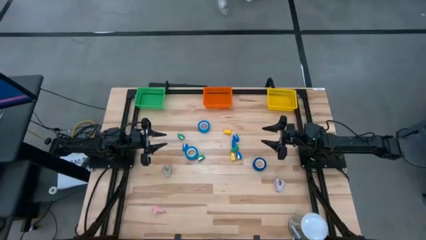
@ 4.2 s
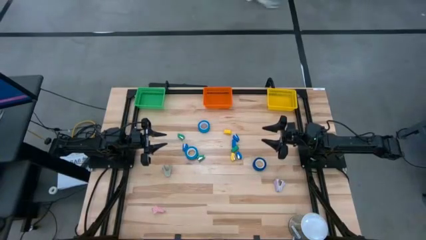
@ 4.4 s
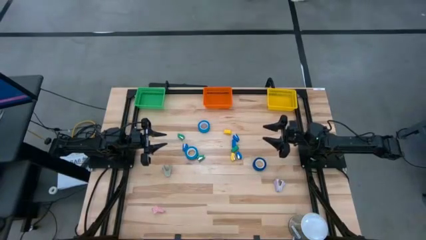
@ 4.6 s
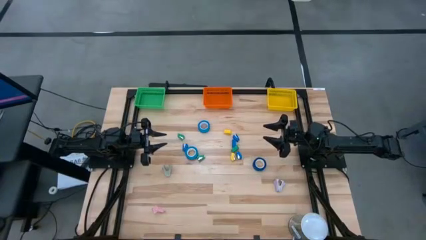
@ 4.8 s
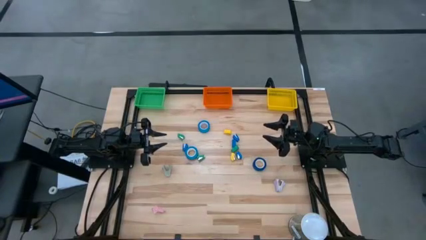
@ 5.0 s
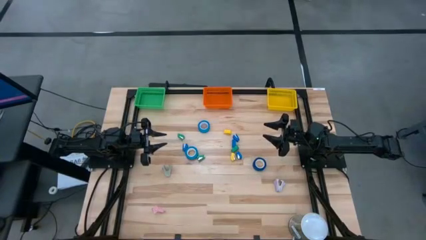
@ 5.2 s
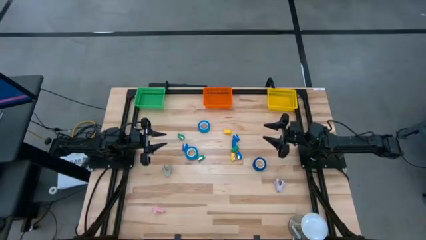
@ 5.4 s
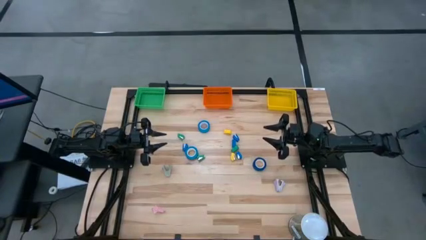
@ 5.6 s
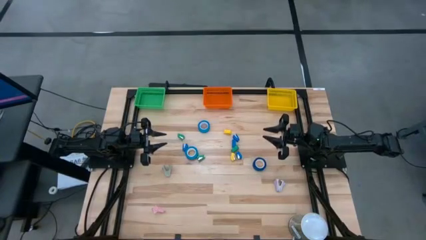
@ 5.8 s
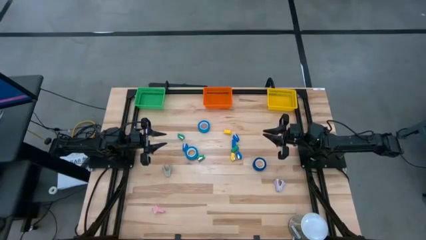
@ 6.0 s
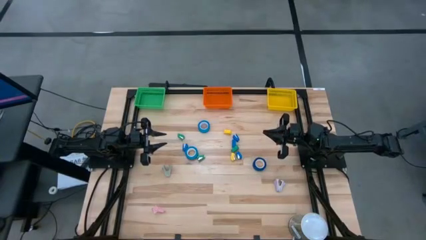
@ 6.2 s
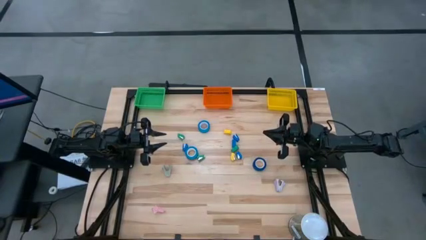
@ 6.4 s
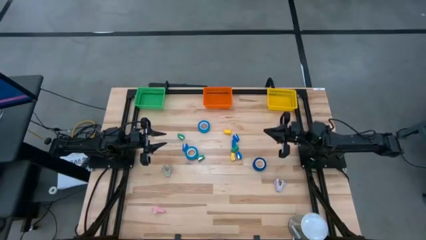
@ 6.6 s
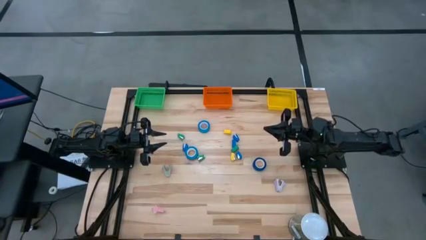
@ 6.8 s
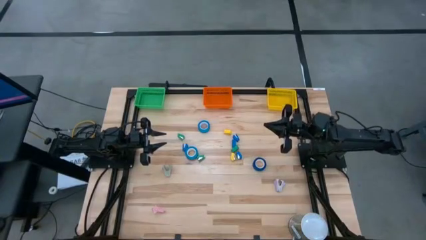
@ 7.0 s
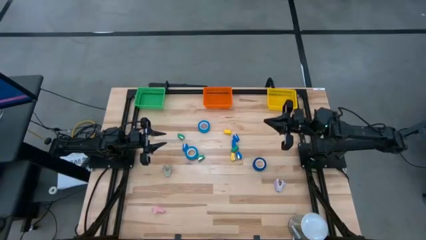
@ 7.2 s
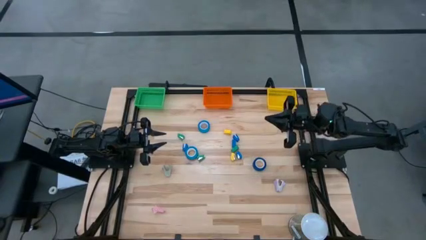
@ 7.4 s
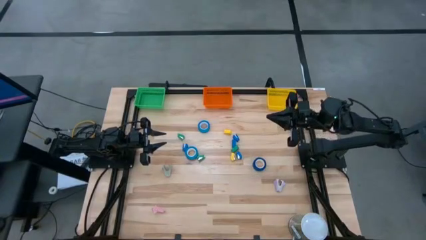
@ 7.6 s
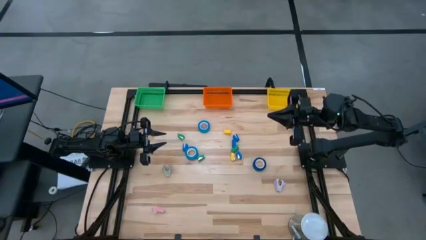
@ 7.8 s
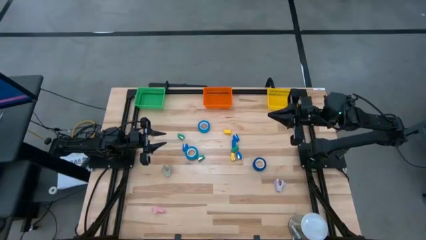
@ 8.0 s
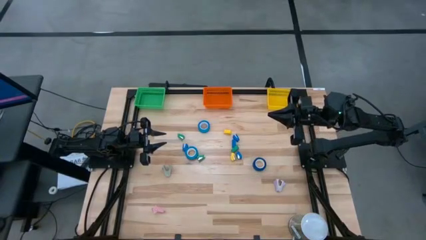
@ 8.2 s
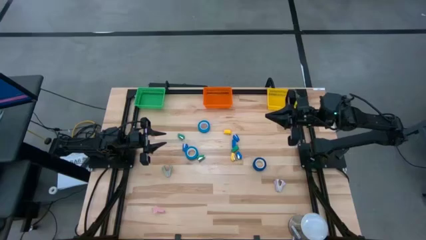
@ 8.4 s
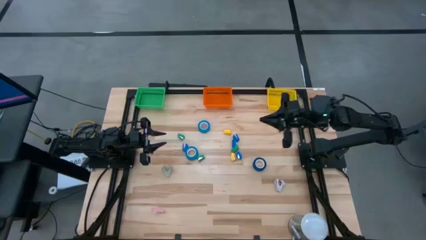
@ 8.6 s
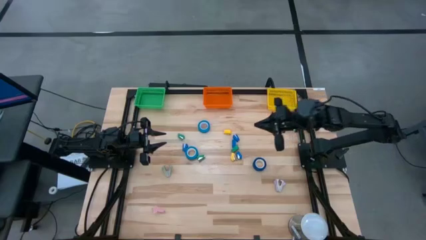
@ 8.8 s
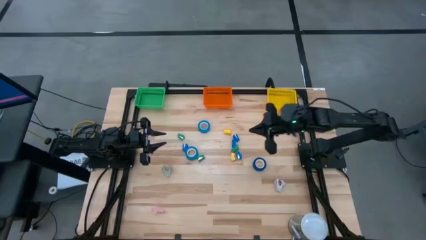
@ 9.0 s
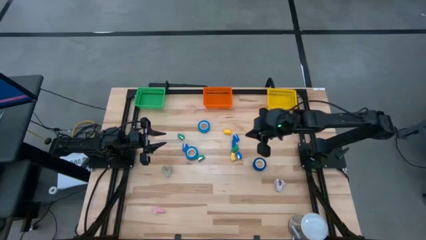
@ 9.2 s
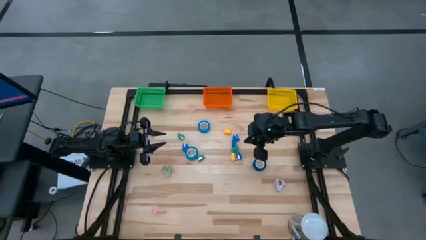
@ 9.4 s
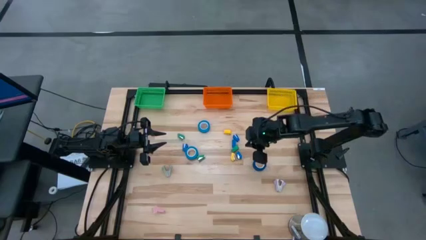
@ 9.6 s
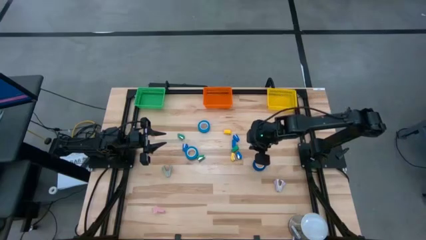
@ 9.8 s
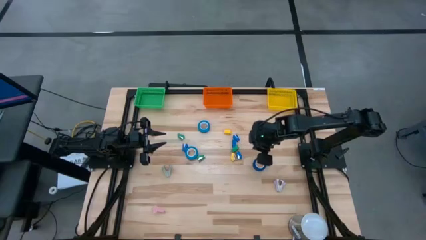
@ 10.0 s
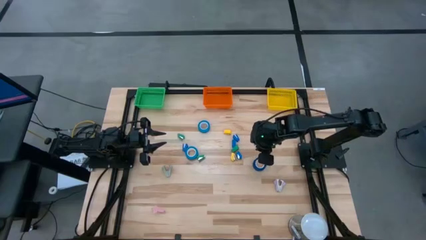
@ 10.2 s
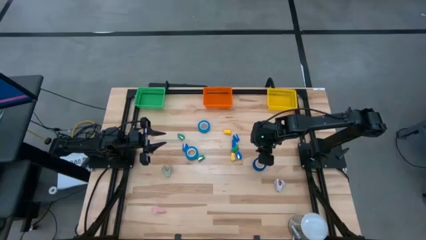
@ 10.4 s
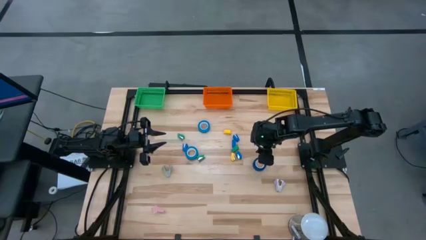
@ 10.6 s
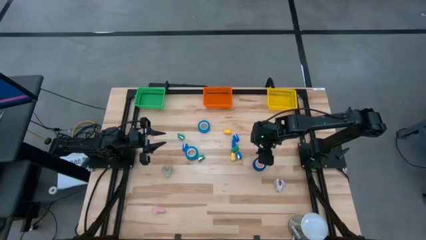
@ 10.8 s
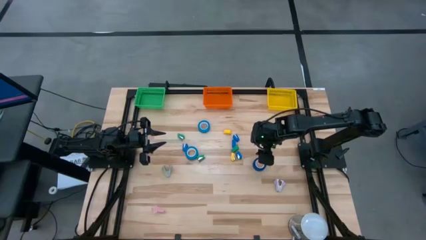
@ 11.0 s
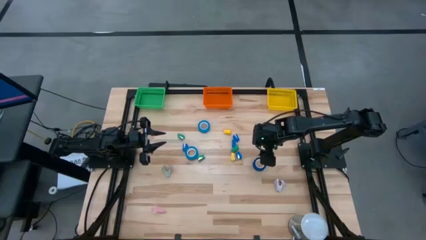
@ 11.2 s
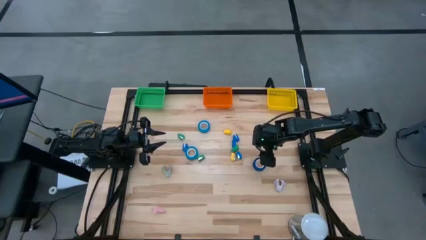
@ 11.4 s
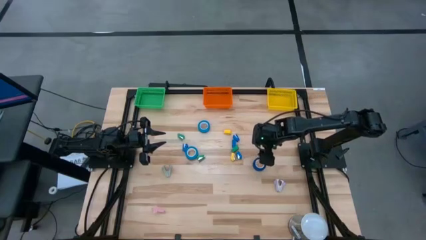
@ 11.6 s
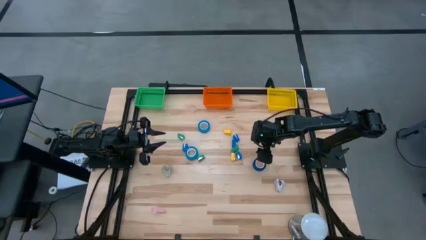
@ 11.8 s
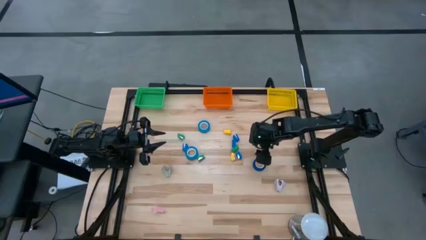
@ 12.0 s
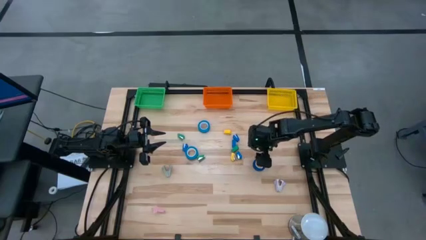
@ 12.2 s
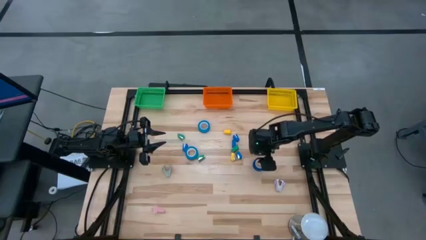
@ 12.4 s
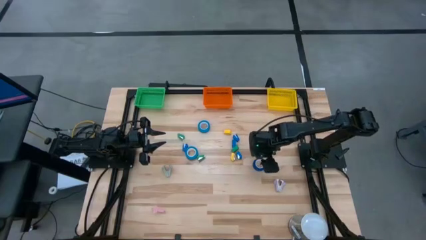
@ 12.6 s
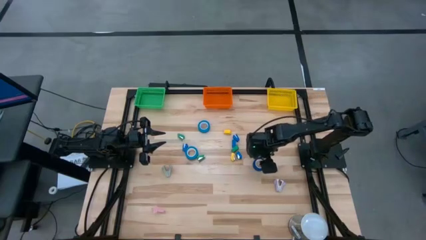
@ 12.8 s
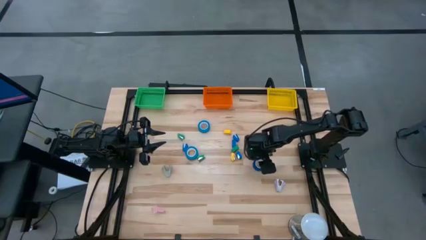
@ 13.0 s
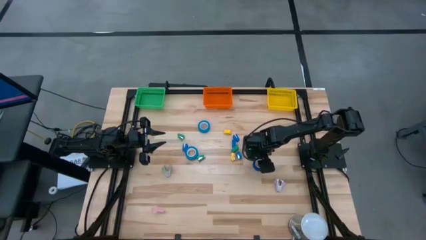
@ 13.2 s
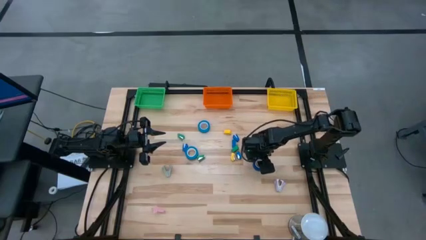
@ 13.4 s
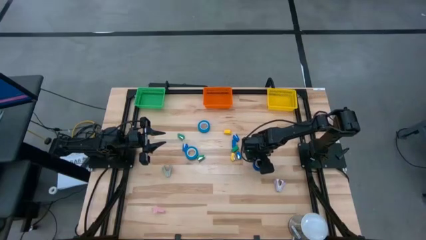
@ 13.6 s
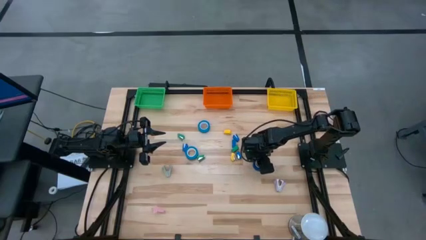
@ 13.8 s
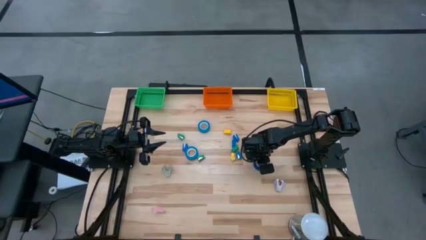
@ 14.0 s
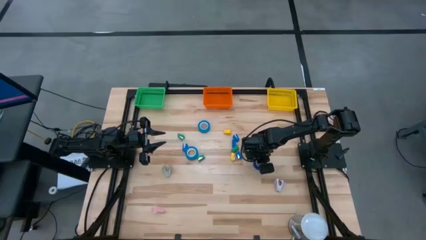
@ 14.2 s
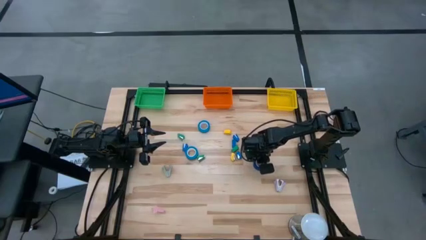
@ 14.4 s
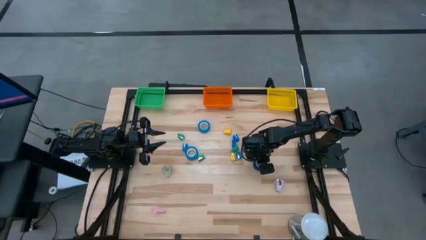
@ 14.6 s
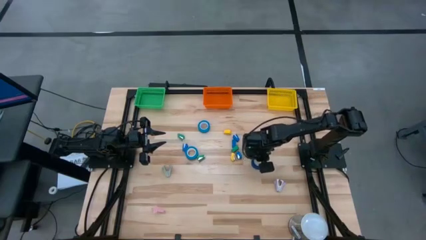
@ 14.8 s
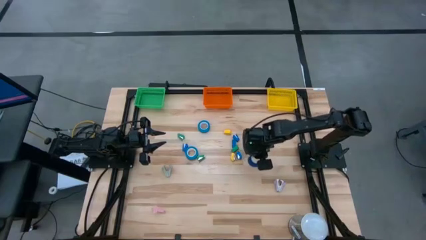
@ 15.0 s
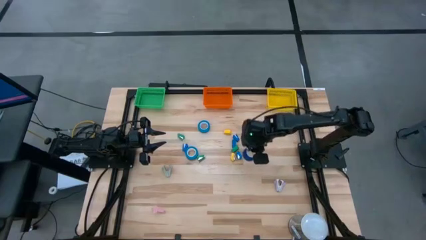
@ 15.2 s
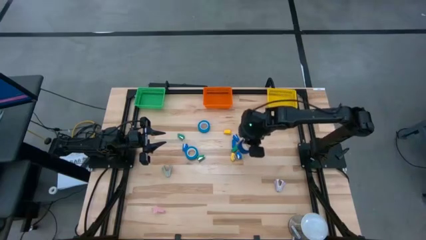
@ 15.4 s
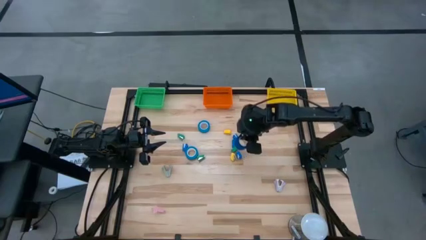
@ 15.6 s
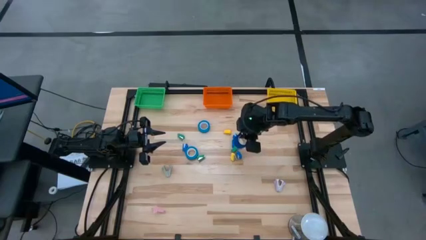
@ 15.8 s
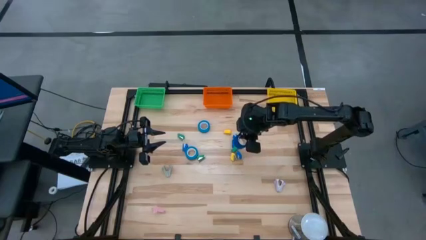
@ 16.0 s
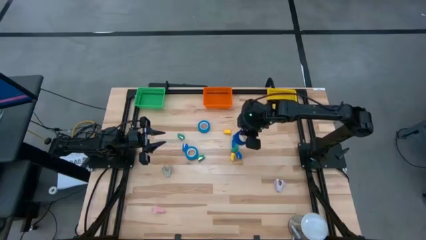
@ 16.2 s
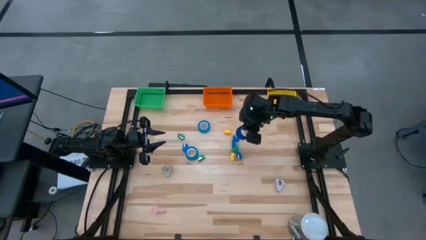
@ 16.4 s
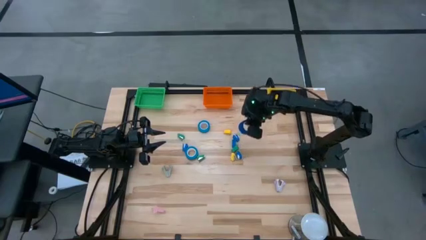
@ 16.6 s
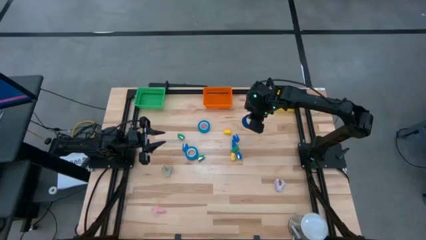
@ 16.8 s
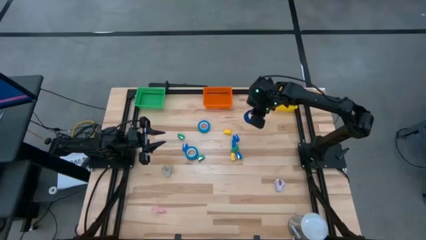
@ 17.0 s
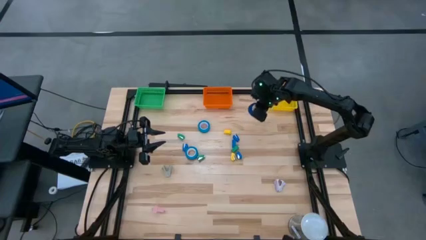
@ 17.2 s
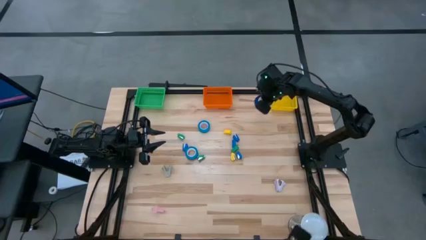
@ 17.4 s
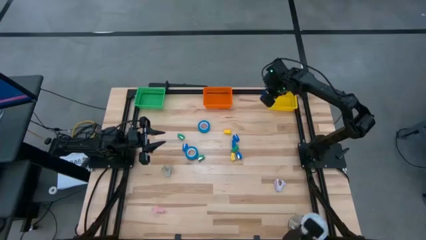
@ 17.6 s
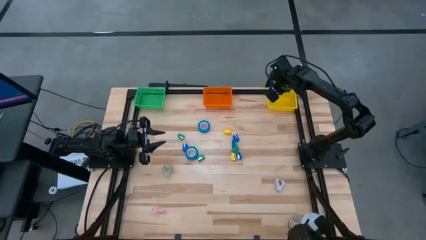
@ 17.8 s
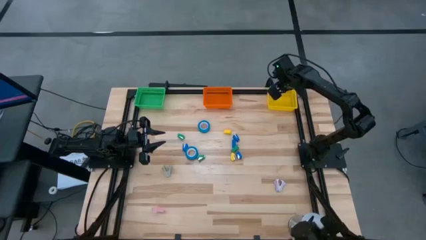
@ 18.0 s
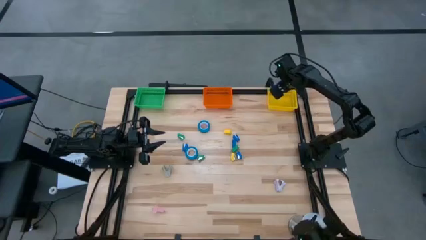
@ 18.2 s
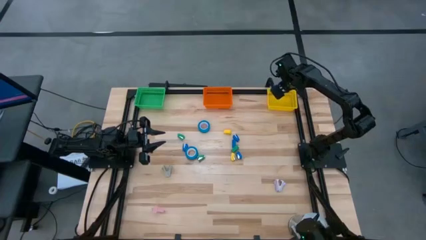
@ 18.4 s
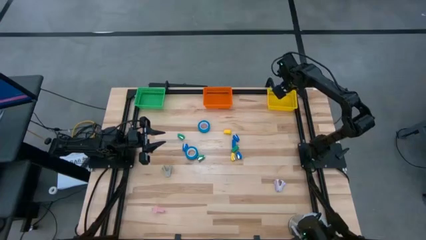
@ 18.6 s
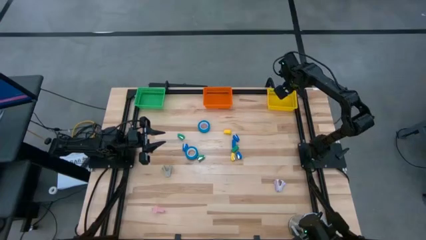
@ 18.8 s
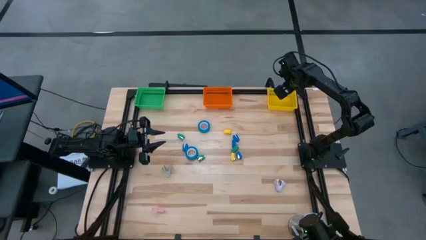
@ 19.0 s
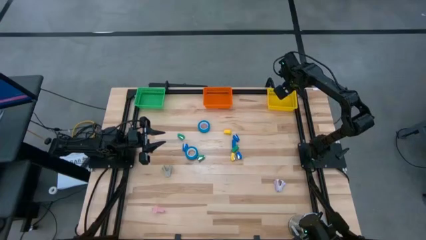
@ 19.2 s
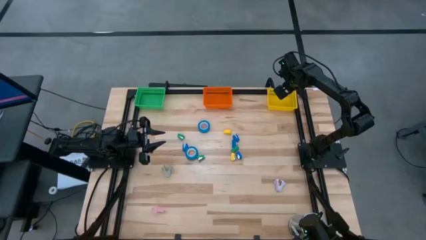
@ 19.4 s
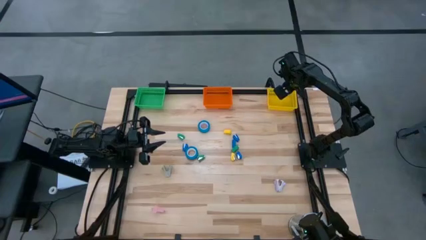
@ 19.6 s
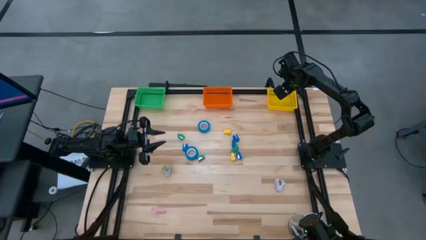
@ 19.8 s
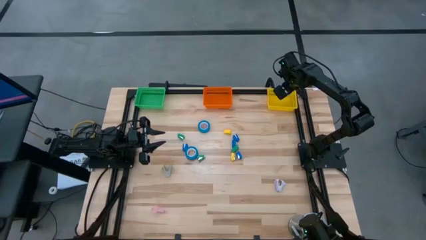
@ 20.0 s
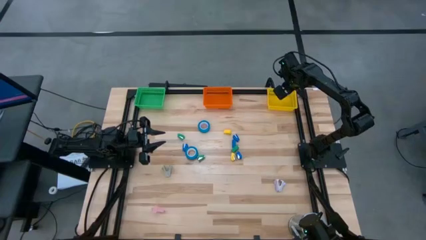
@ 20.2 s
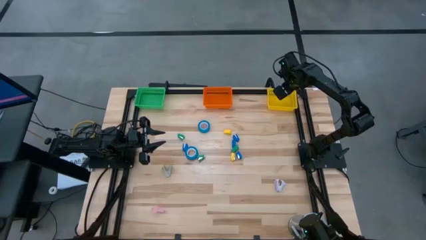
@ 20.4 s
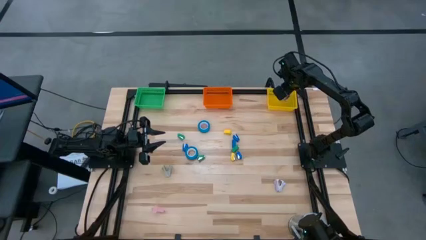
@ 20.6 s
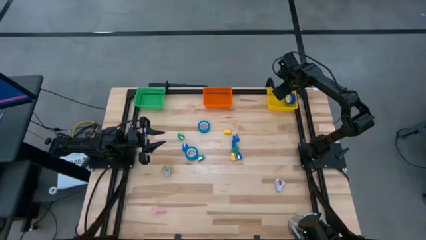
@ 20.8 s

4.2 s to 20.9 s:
Task: Pick and place Stapler, Stapler remover, tape
Put the dark blue tape into the yellow bin
